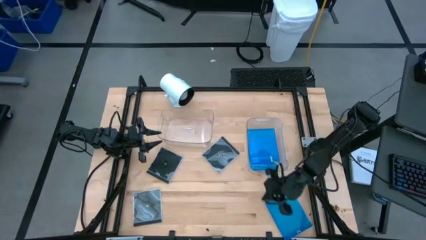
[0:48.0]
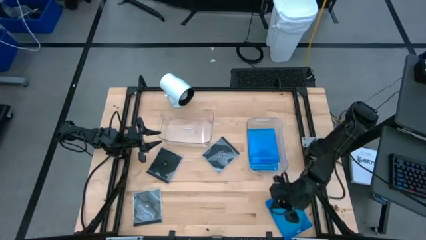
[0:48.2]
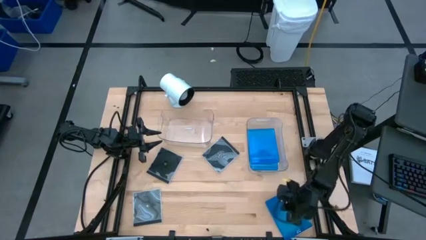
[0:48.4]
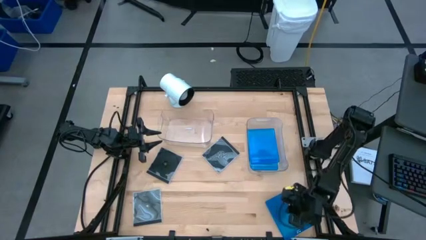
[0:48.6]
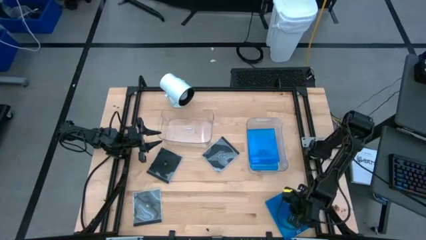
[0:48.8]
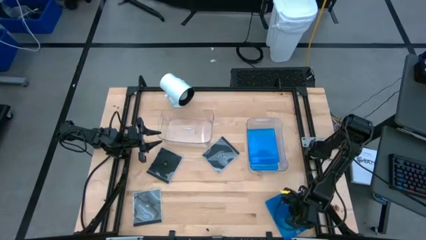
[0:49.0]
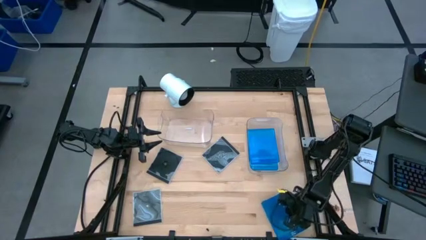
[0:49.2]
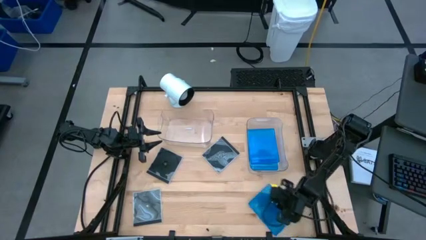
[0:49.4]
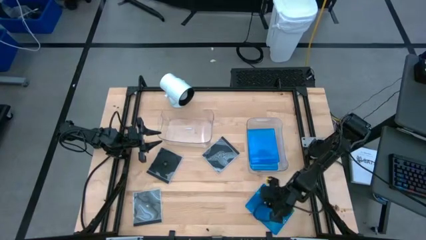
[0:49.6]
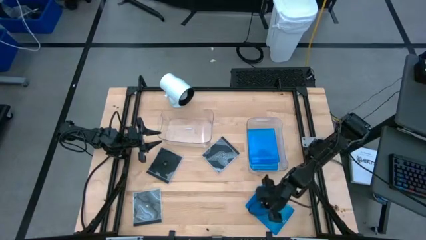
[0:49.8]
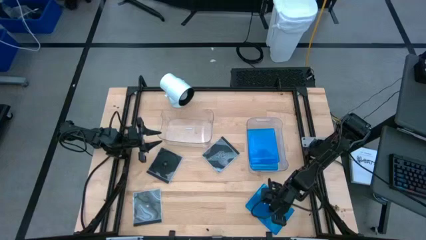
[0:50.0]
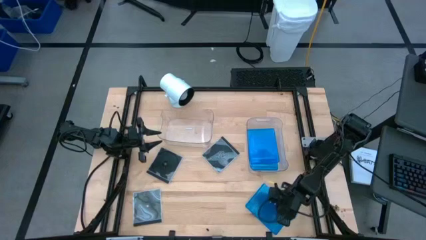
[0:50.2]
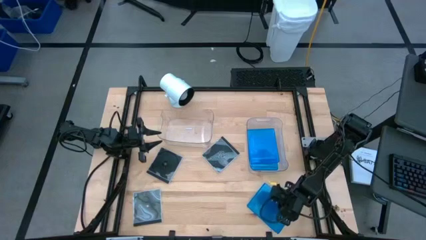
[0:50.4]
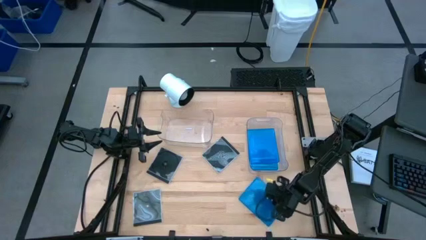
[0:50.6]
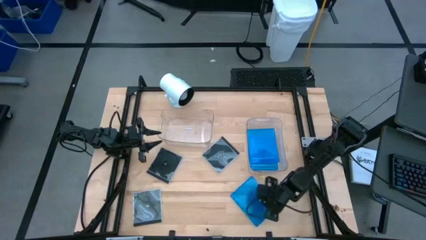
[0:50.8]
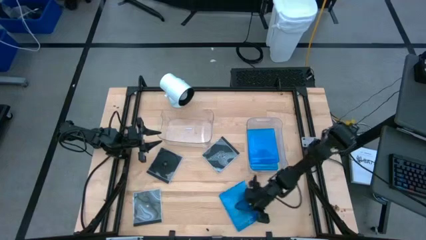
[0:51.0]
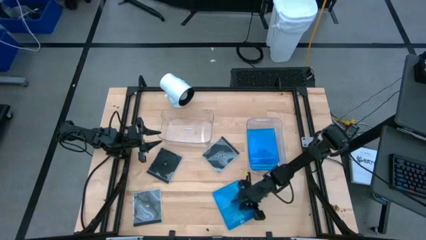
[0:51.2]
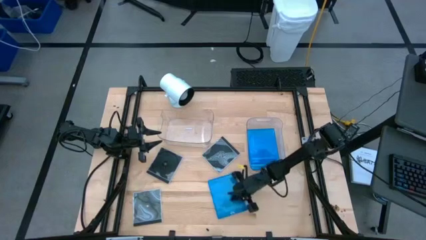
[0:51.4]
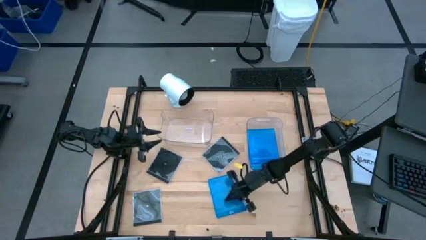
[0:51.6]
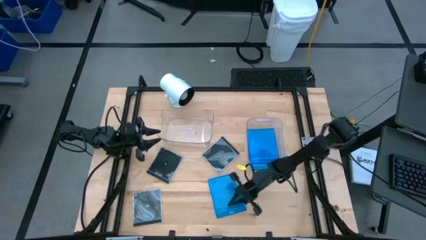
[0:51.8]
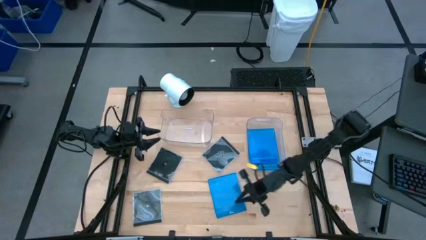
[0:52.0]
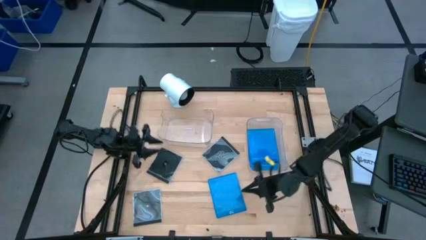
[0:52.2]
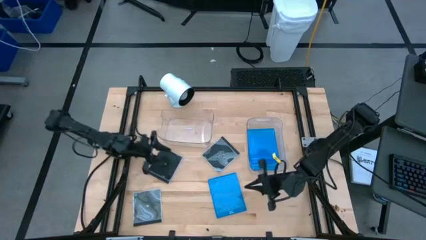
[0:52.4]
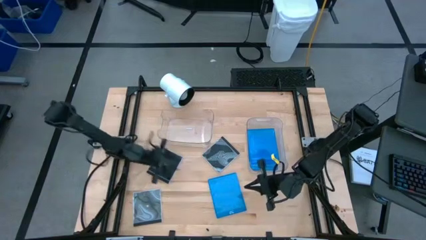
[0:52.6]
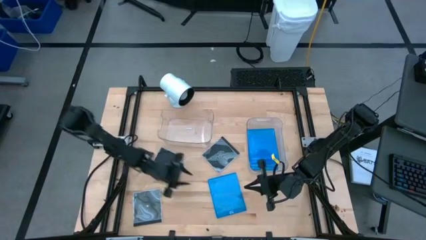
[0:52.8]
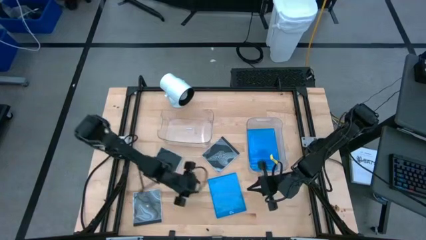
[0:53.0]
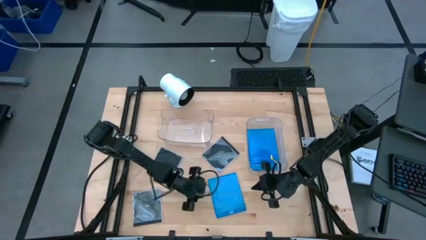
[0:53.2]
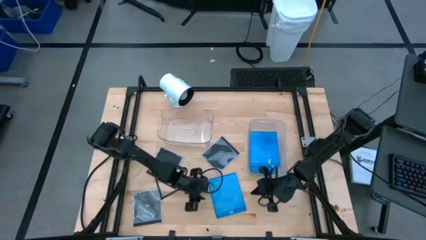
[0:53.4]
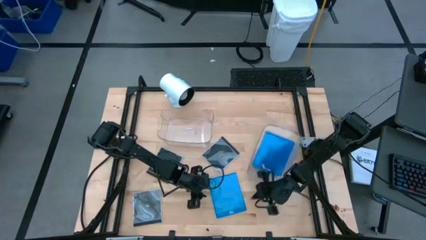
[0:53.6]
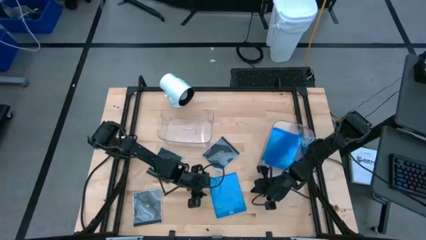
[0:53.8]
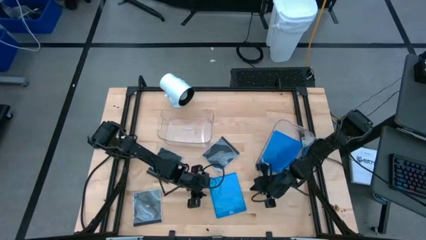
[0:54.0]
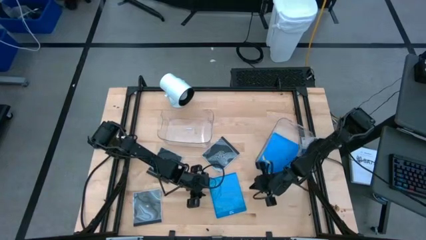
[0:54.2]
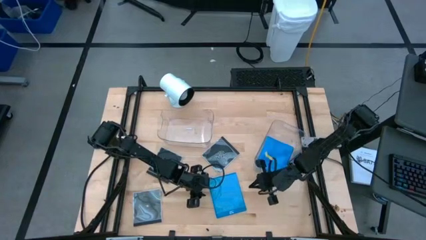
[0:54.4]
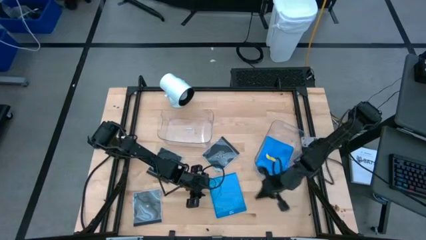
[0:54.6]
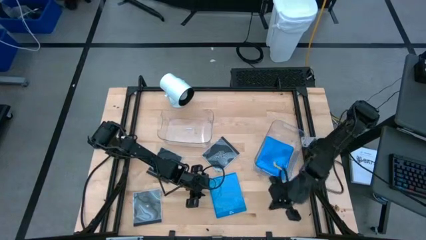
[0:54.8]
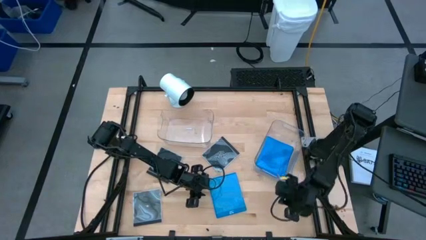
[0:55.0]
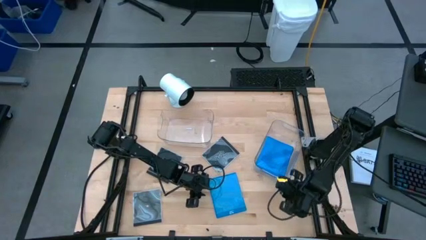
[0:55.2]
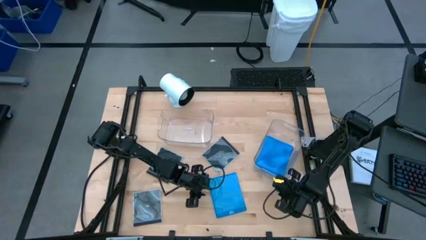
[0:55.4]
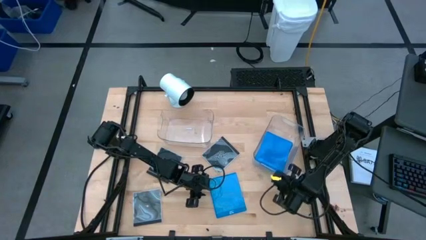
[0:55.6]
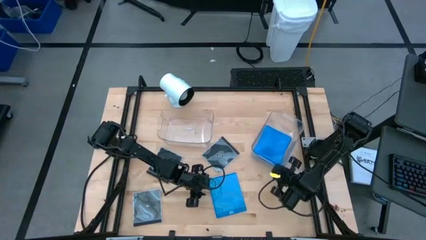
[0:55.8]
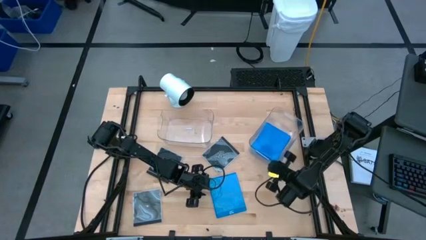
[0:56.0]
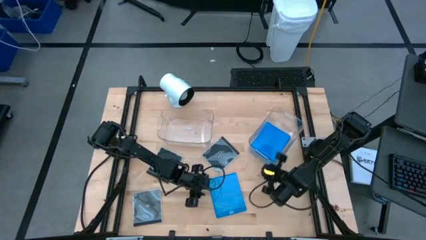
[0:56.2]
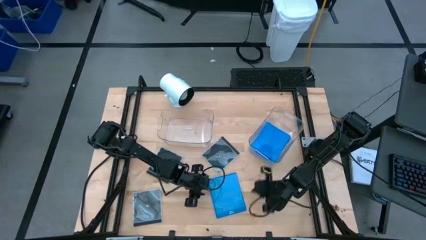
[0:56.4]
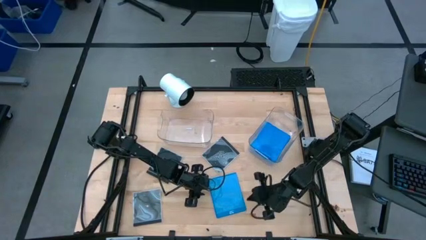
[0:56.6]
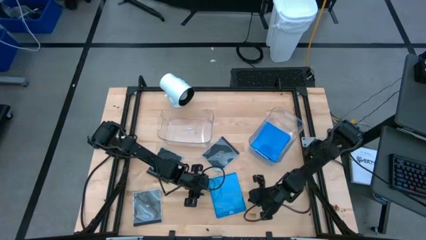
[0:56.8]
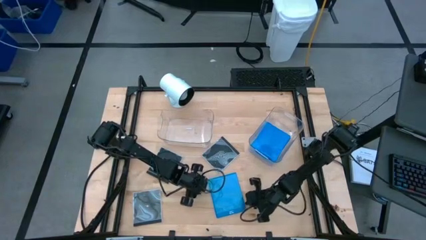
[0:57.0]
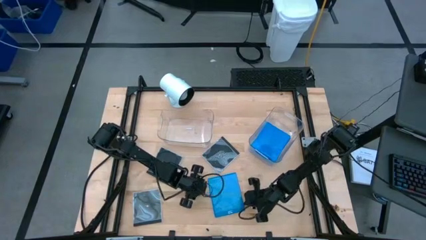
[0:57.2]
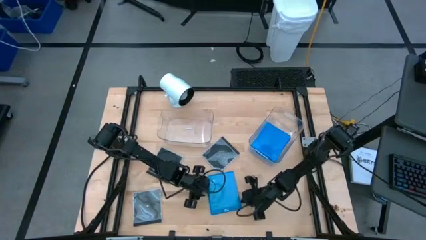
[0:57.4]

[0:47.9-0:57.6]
Task: Pick & place jewel cases by type
Put the blue cd case into the right transparent bin

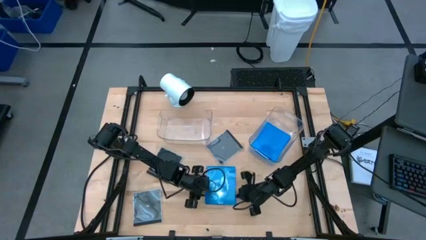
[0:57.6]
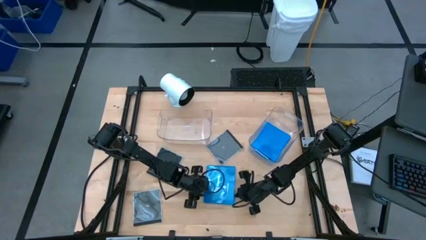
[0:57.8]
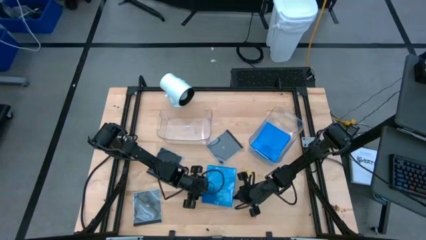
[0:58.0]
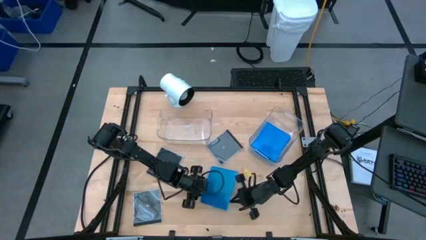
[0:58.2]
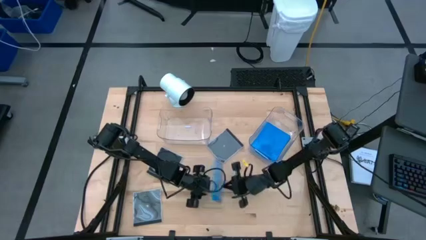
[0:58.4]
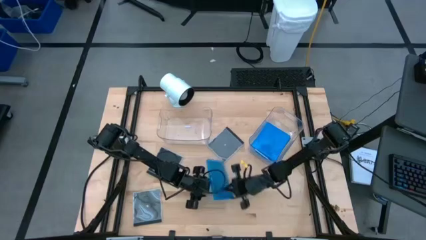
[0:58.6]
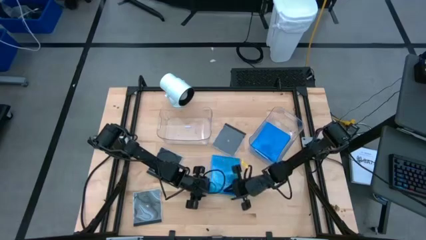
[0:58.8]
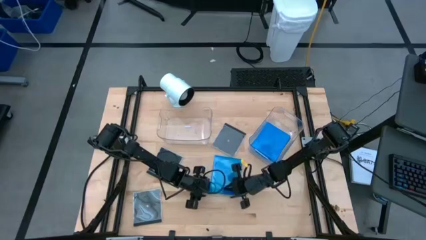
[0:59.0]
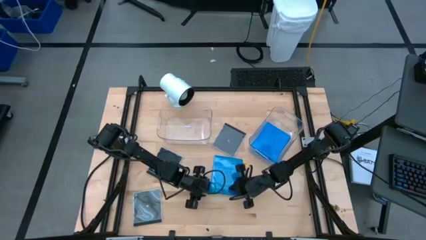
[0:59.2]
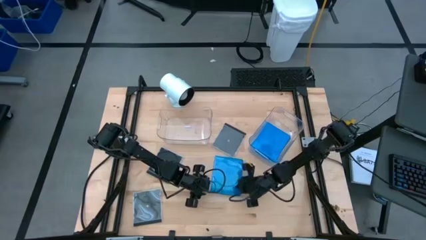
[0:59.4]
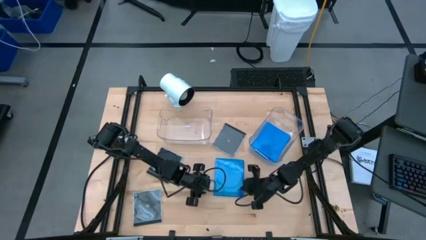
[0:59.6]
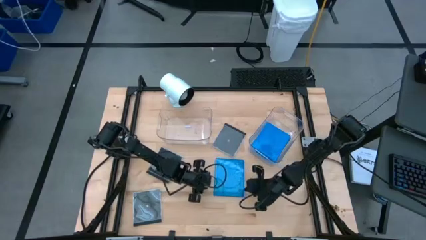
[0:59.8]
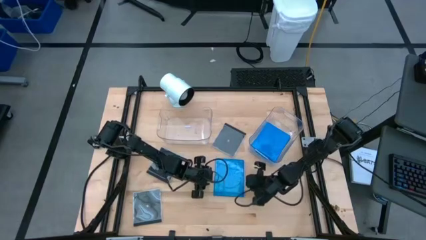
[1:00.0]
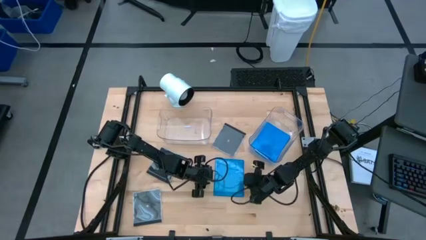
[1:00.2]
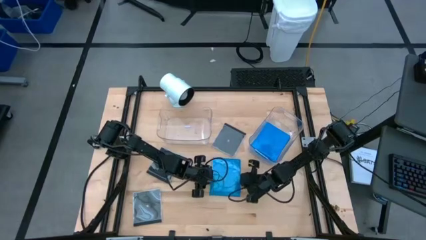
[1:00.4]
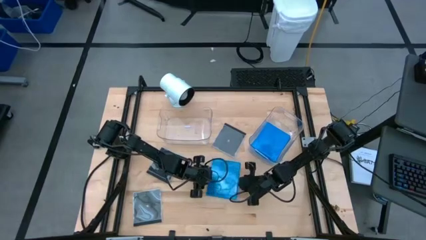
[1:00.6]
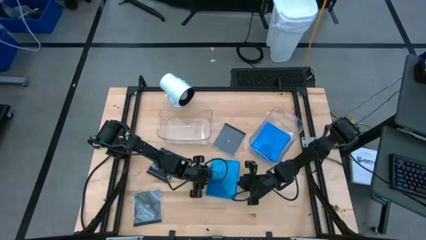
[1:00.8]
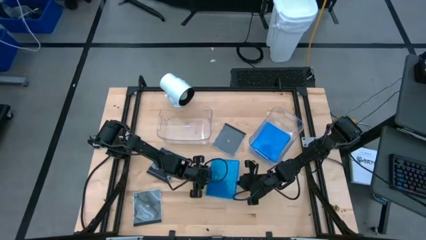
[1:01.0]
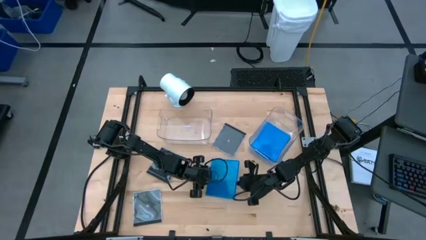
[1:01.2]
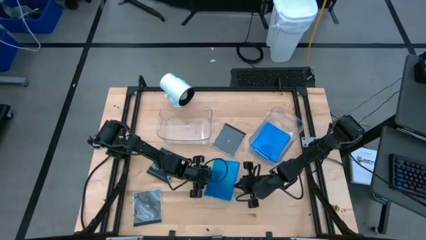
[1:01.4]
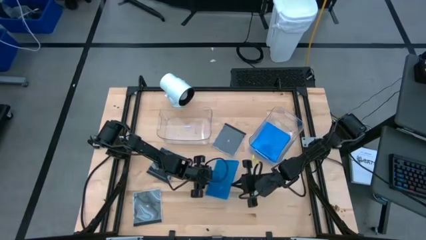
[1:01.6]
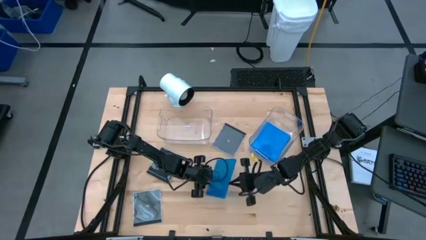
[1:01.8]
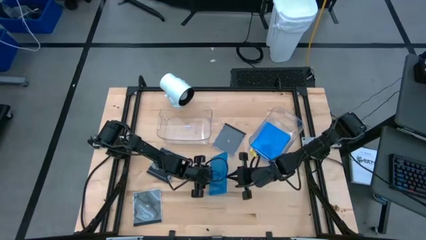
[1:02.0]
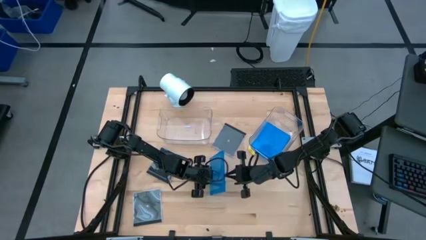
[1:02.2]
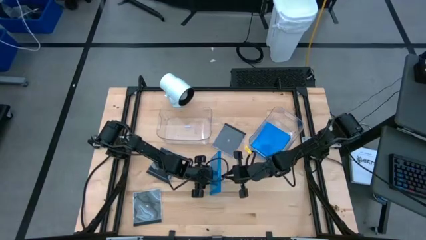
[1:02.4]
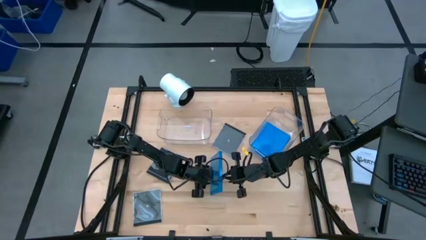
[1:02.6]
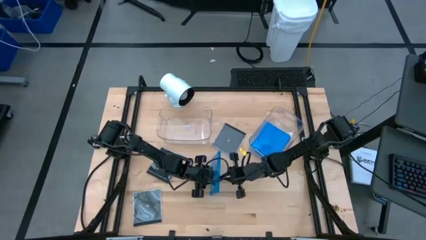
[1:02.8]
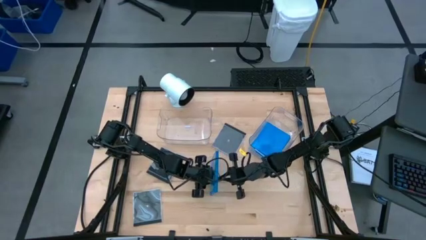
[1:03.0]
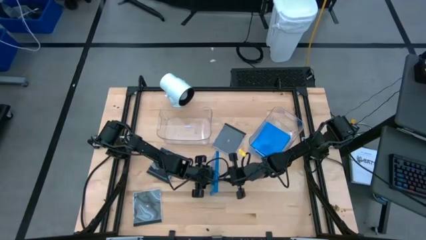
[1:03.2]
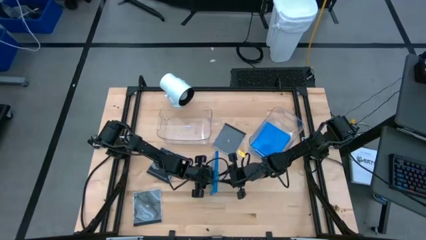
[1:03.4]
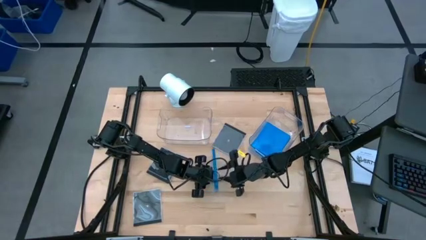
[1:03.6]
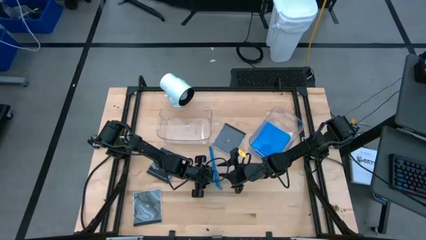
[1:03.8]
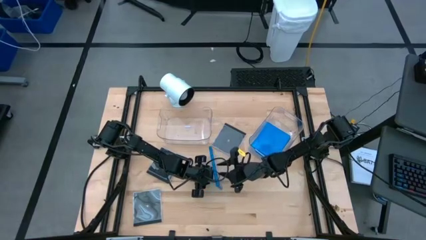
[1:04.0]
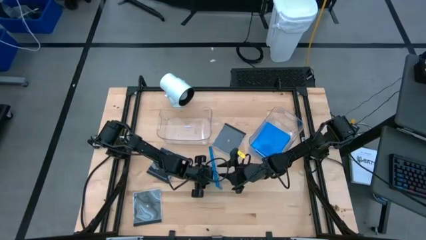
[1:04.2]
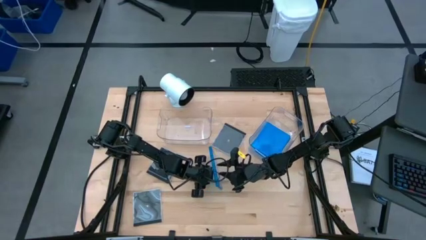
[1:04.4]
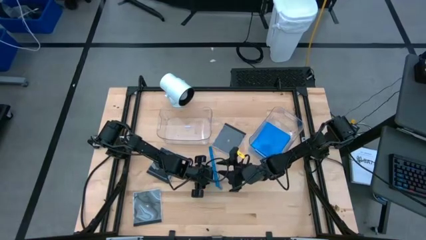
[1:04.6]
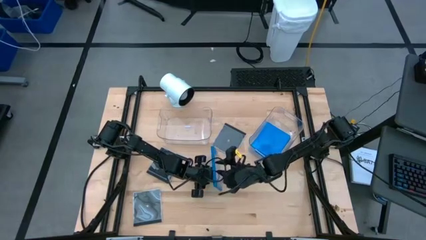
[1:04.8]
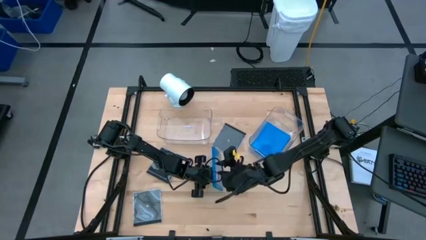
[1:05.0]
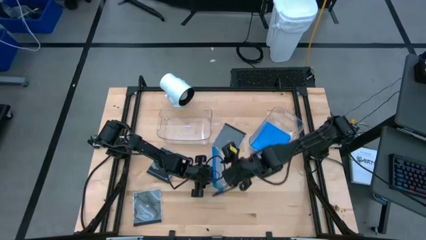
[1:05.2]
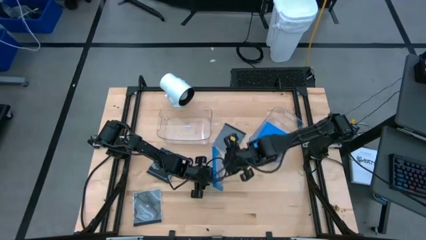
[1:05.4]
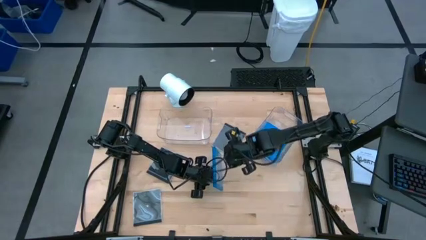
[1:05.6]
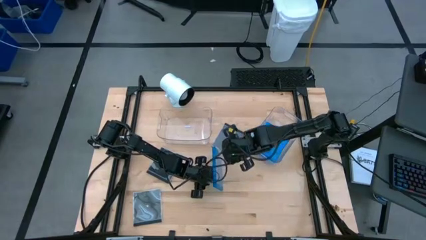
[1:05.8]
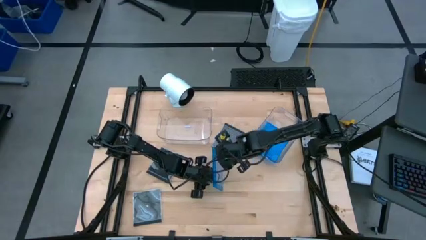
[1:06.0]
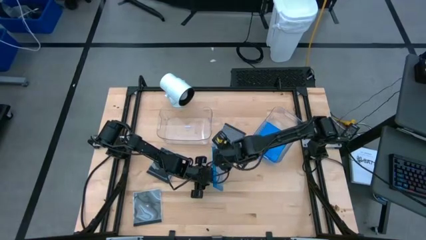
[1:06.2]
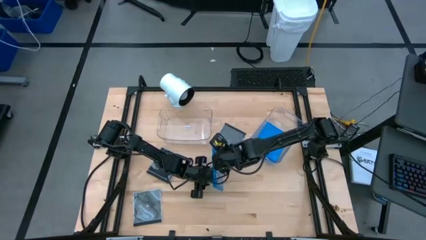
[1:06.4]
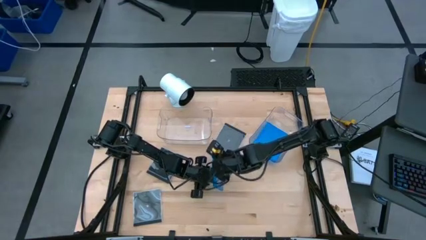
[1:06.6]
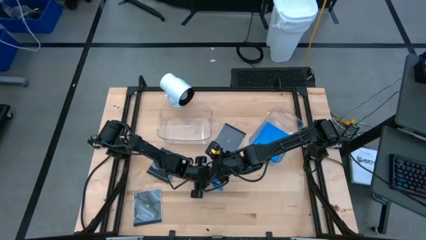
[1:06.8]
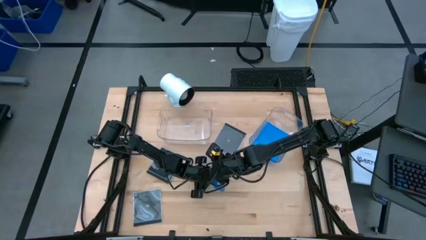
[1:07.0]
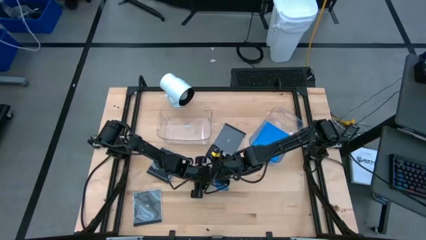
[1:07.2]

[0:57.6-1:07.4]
Put the blue cd case into the right transparent bin
